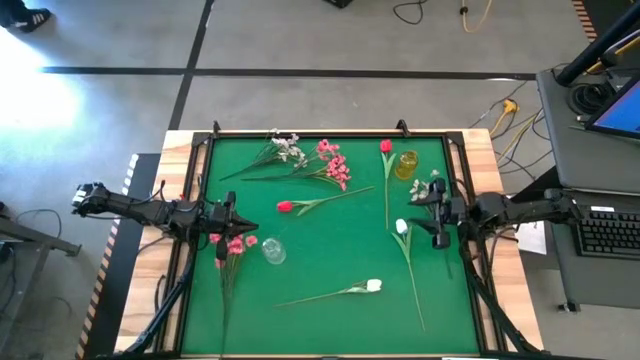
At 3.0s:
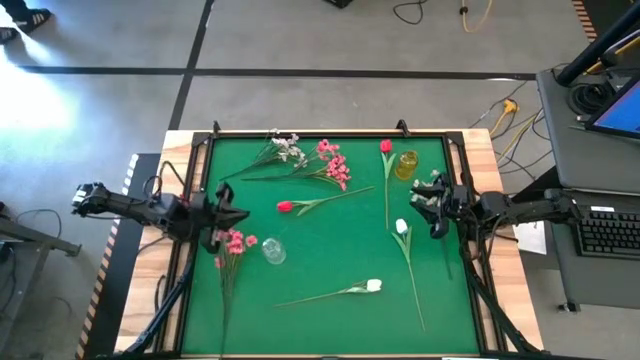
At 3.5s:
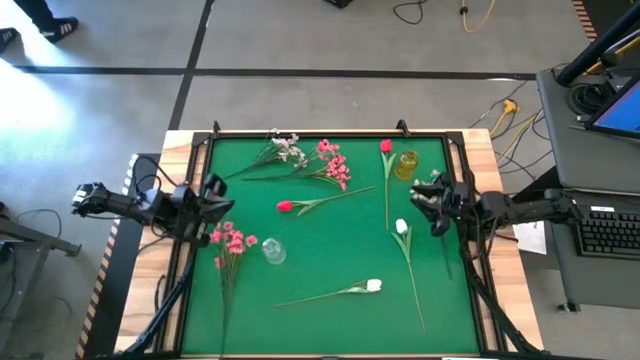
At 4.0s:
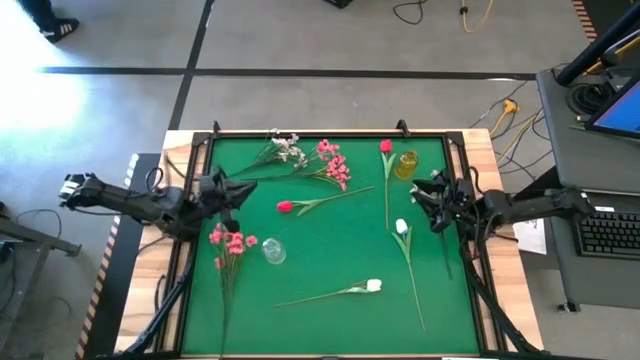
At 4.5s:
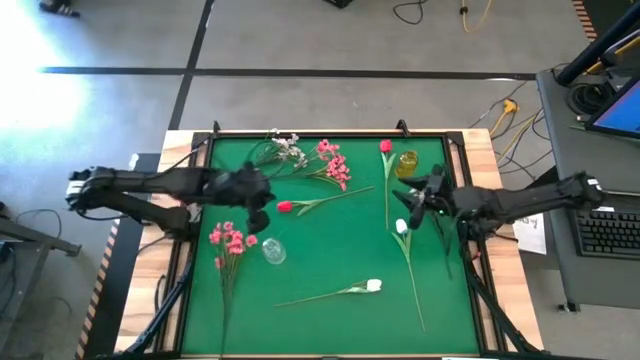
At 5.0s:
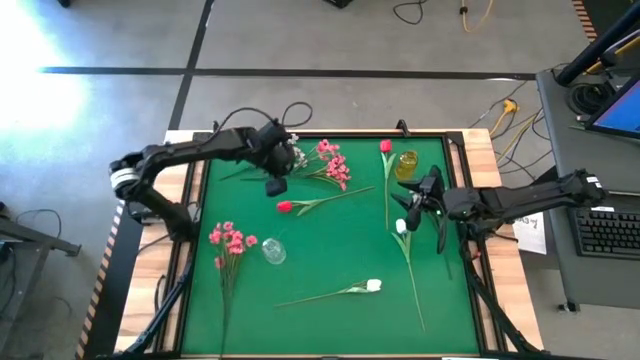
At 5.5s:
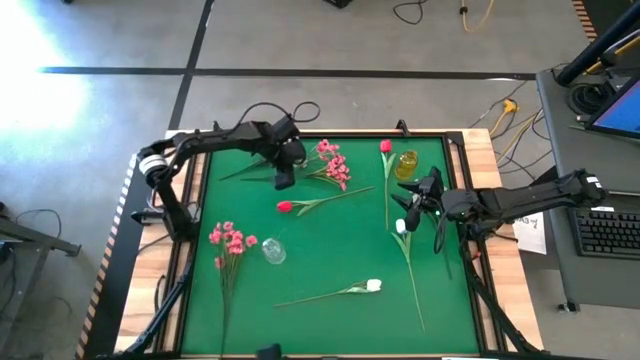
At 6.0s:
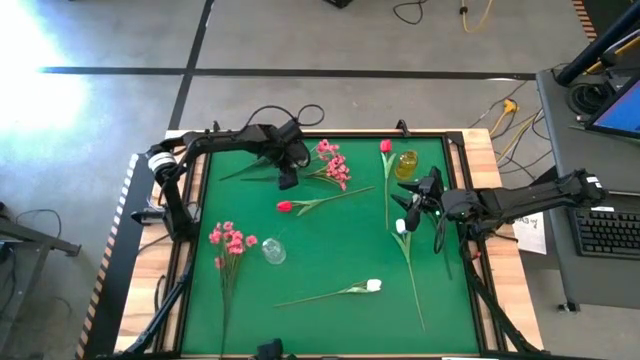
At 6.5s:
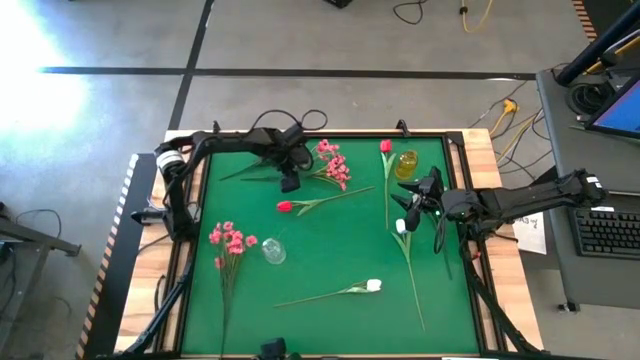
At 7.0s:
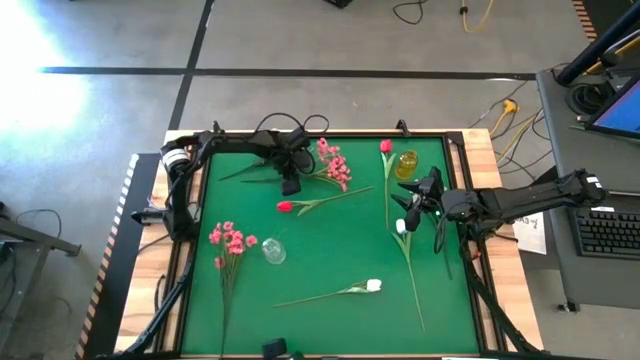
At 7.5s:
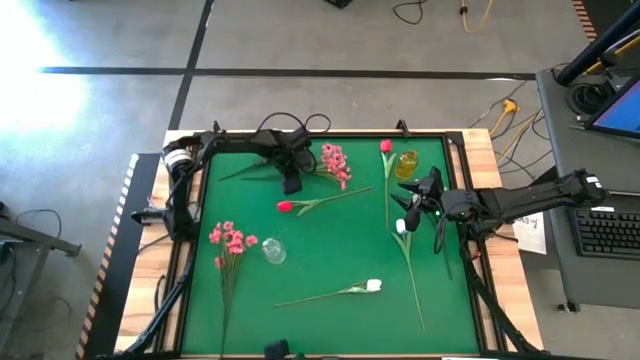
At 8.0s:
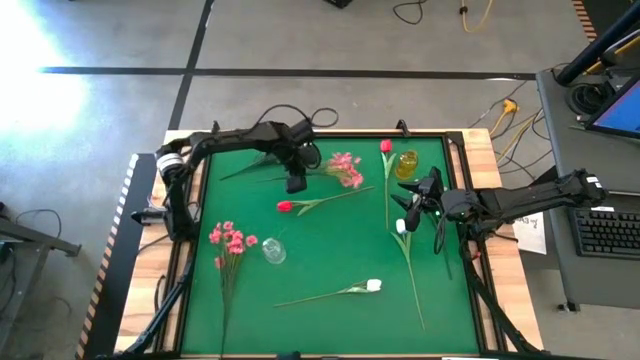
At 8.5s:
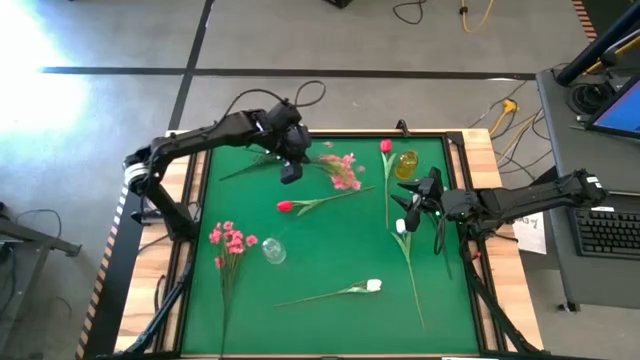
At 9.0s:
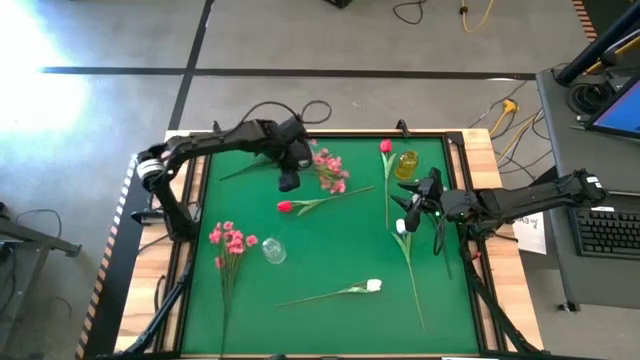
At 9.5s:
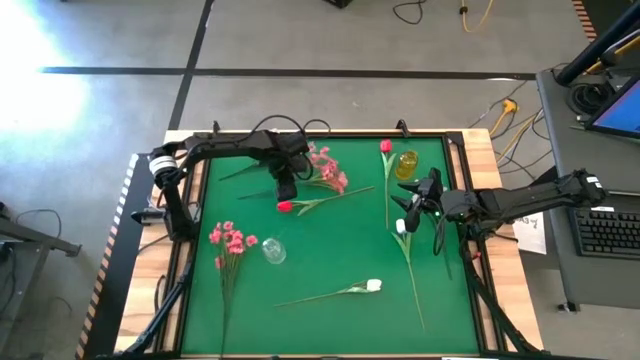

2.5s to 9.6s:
Task: Sort flowers into vase by color
Put the top pink flowers into the transparent vase

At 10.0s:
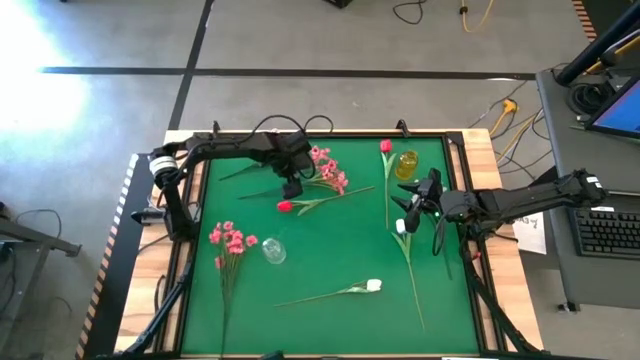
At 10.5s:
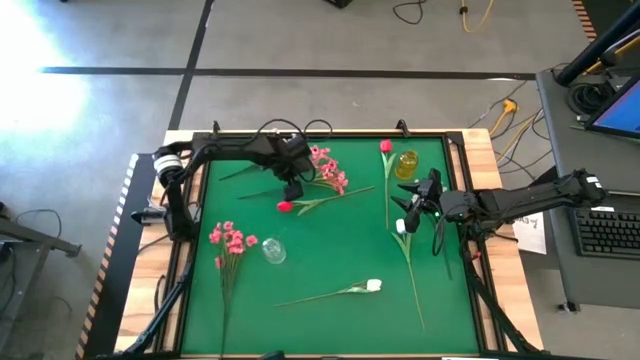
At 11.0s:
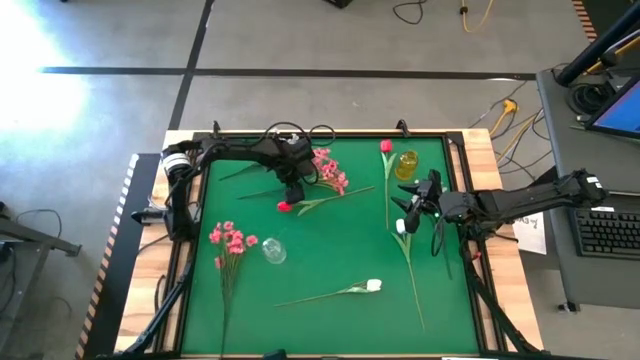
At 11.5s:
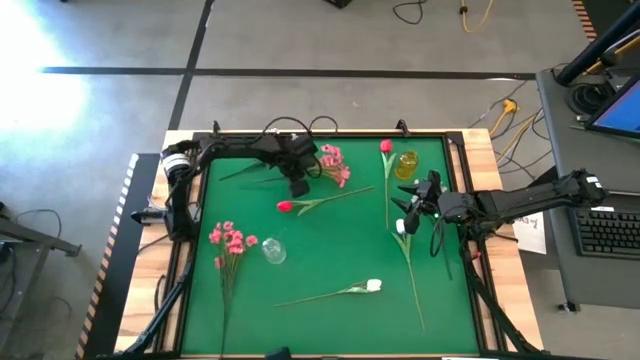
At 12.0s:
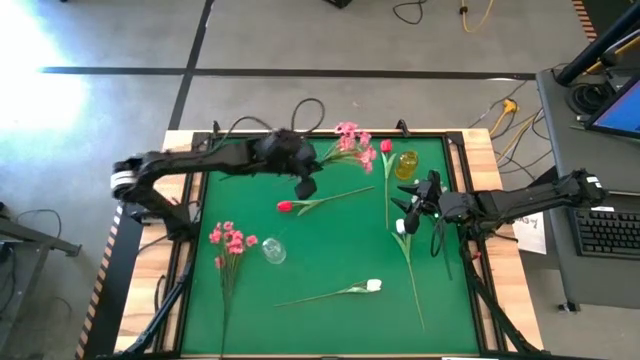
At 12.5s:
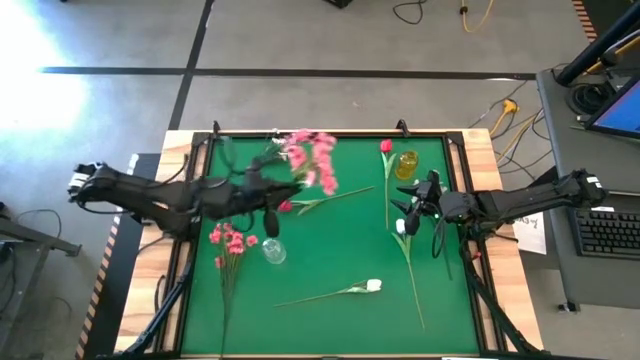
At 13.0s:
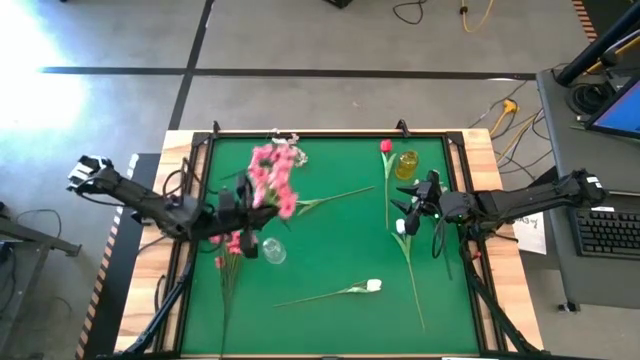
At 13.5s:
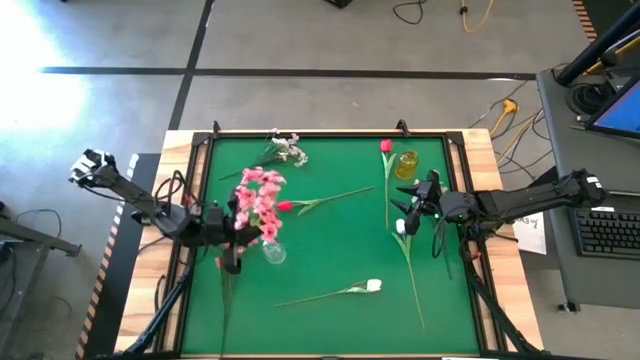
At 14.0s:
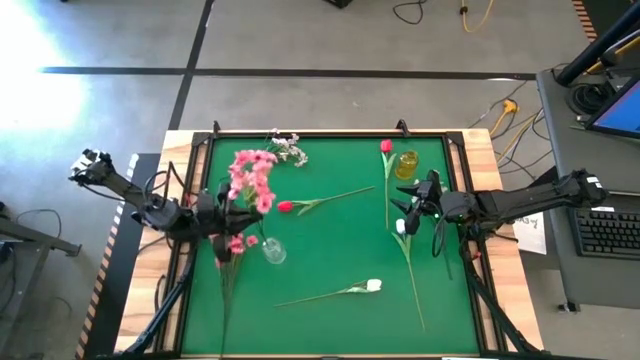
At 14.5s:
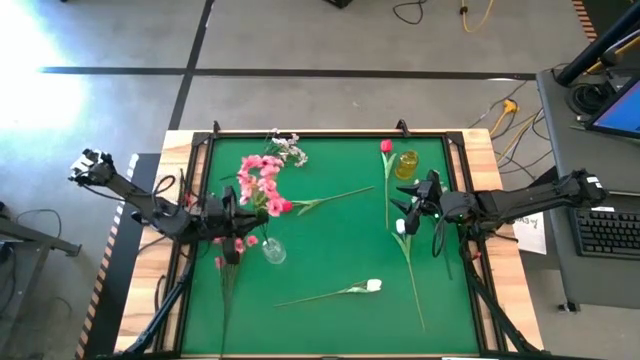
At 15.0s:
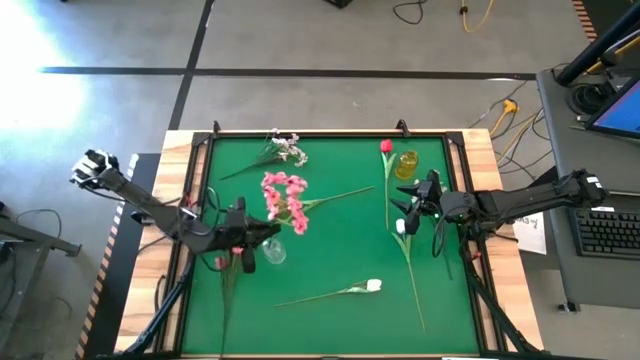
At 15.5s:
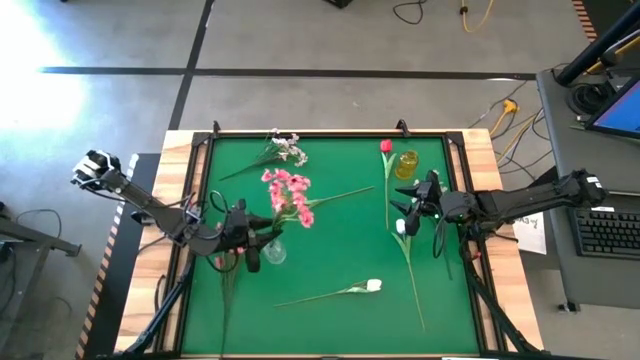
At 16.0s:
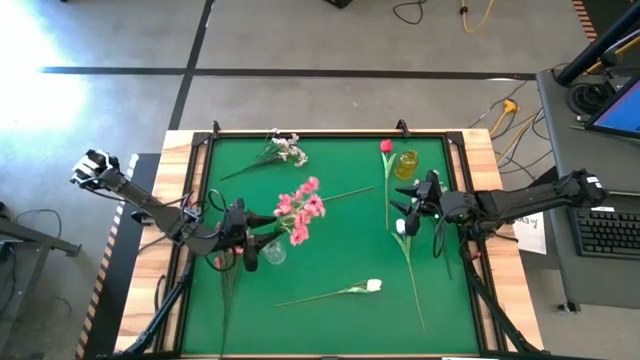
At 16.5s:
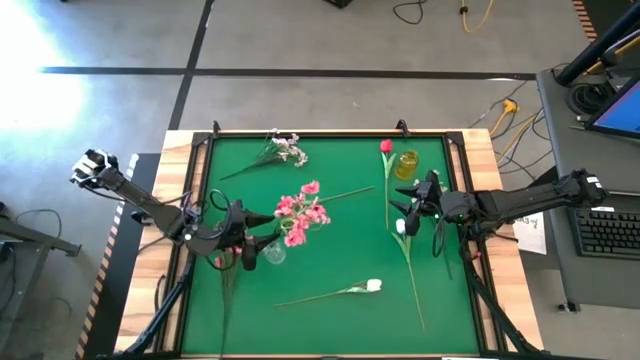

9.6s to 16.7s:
Put the top pink flowers into the transparent vase

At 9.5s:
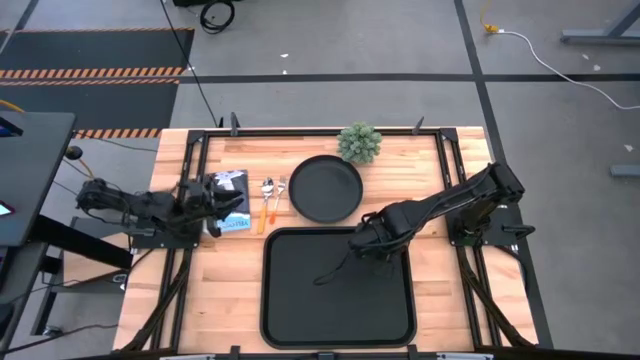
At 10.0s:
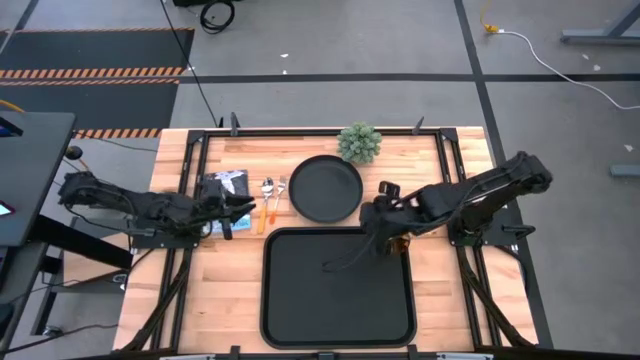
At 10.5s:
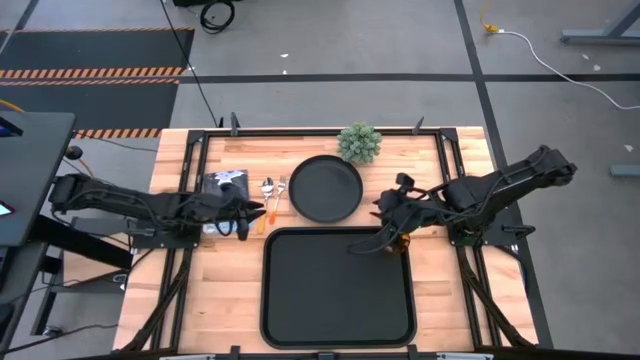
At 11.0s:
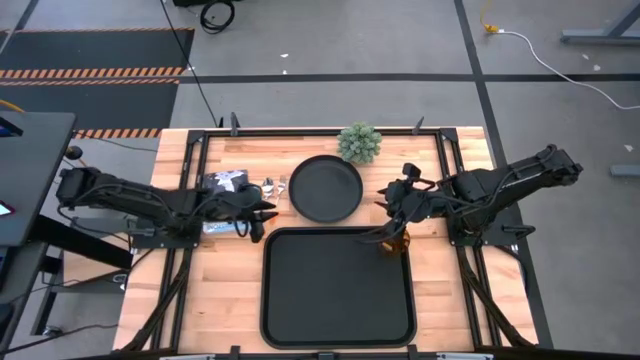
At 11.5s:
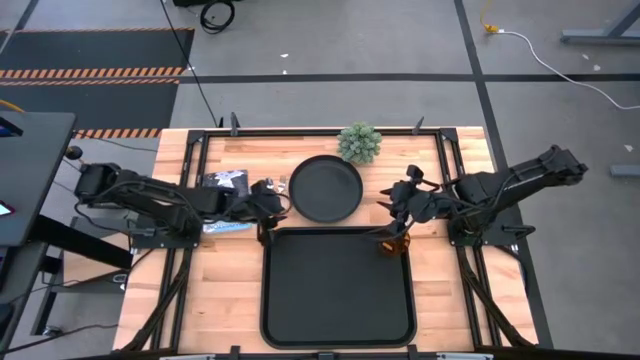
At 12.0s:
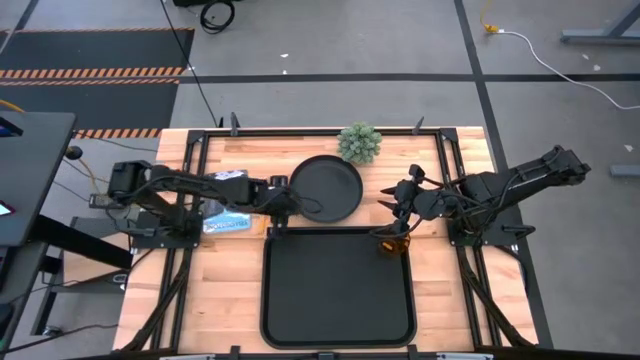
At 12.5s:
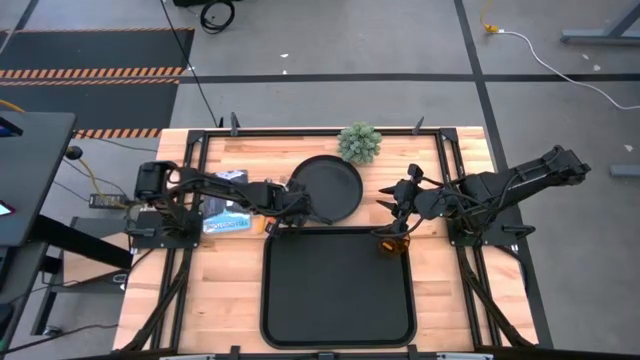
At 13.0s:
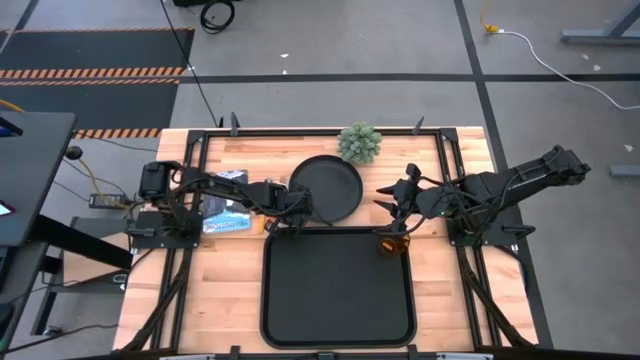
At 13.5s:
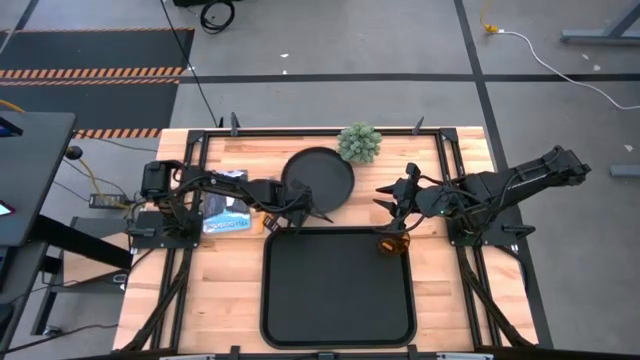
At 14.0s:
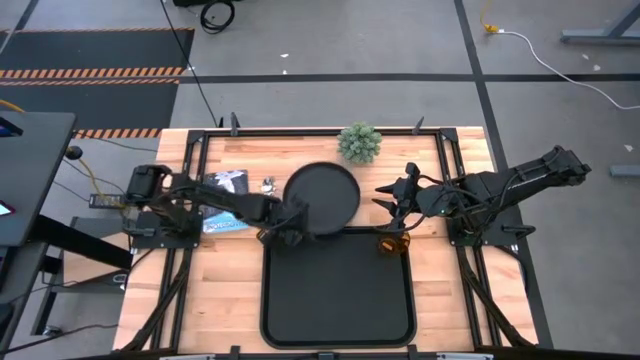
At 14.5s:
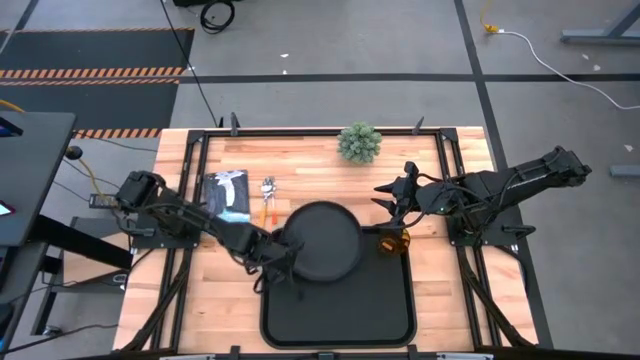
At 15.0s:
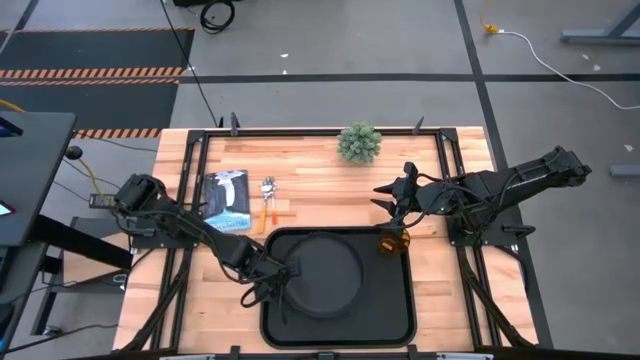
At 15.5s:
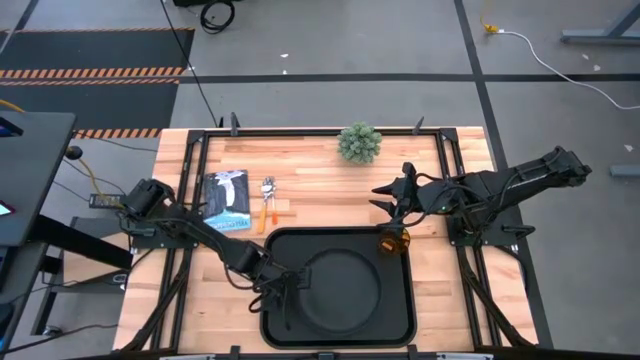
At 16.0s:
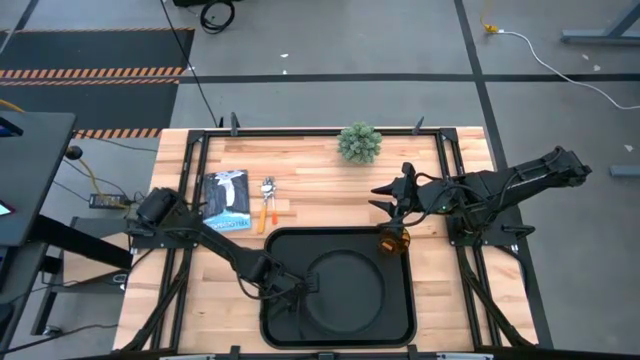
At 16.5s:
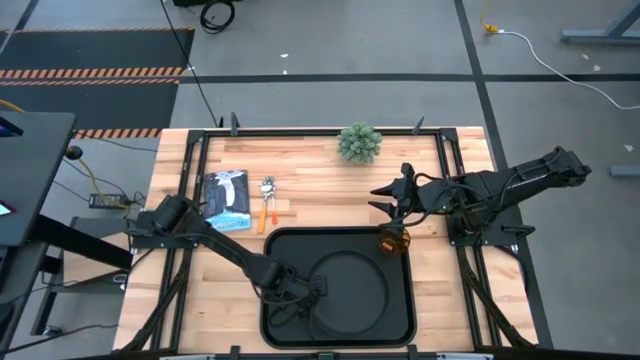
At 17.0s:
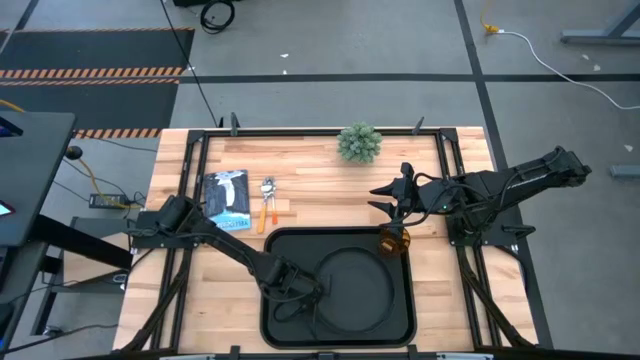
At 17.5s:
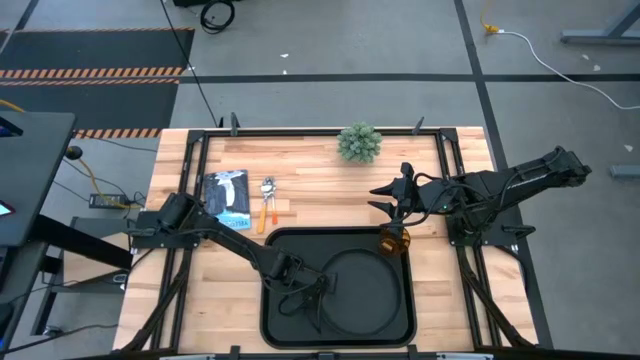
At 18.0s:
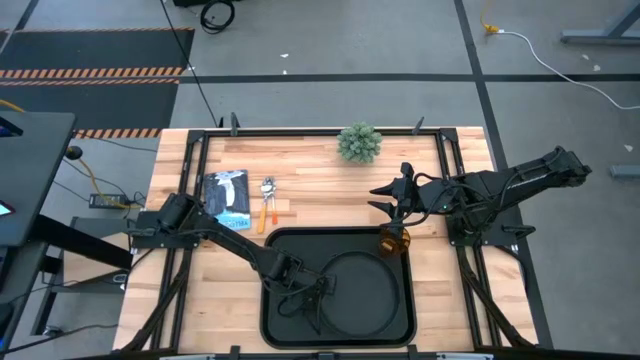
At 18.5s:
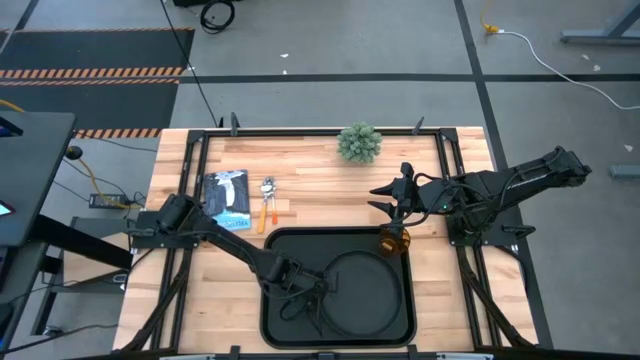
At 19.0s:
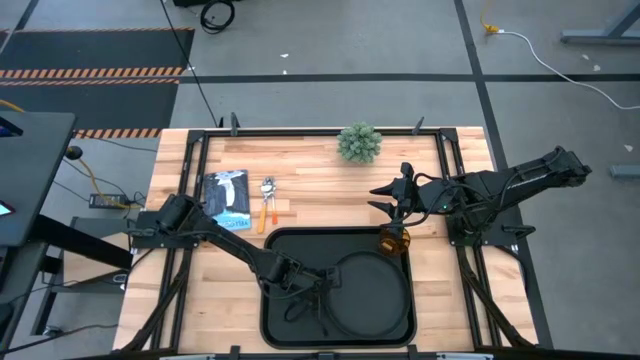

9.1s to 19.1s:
Task: Pick and place plate/cup/fork/spoon on tray
Put the black plate on the black tray to the bottom of the brown cup
